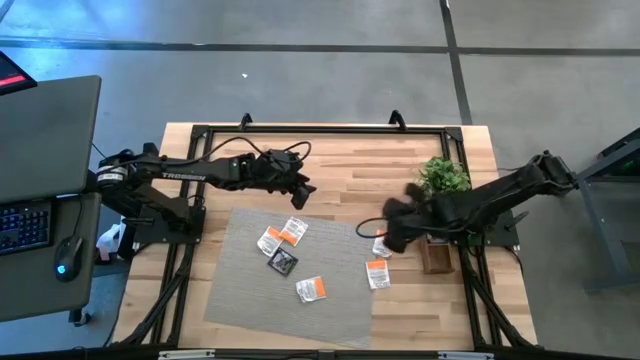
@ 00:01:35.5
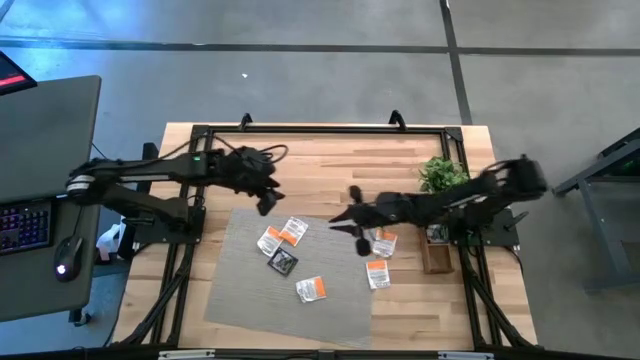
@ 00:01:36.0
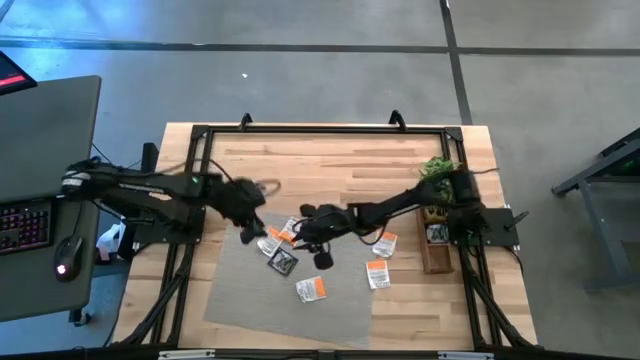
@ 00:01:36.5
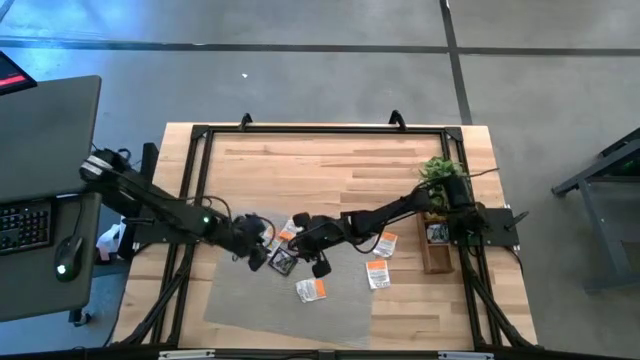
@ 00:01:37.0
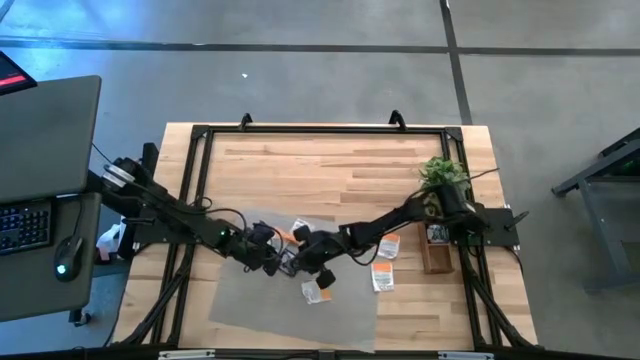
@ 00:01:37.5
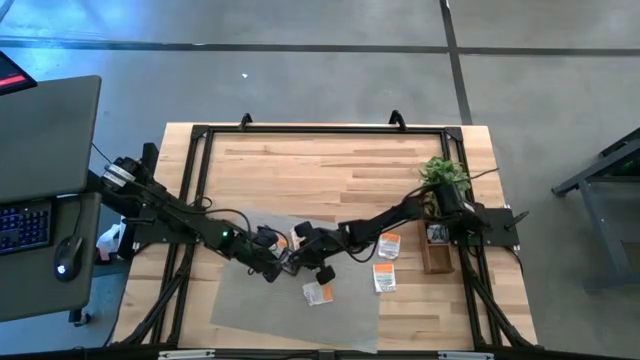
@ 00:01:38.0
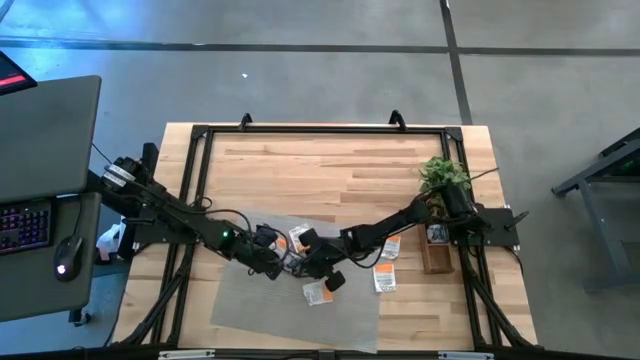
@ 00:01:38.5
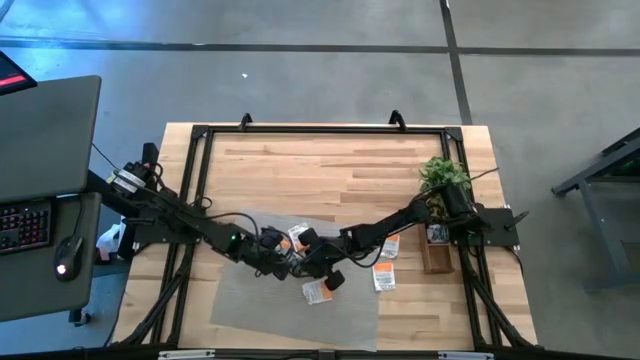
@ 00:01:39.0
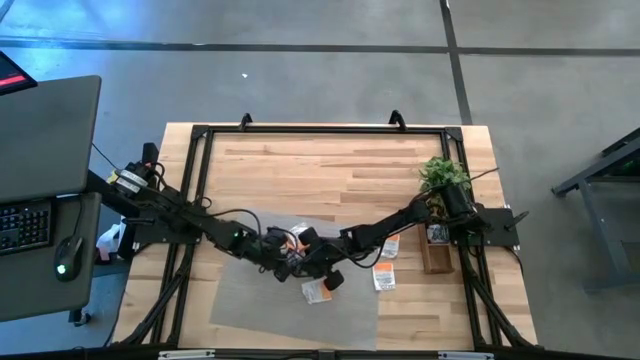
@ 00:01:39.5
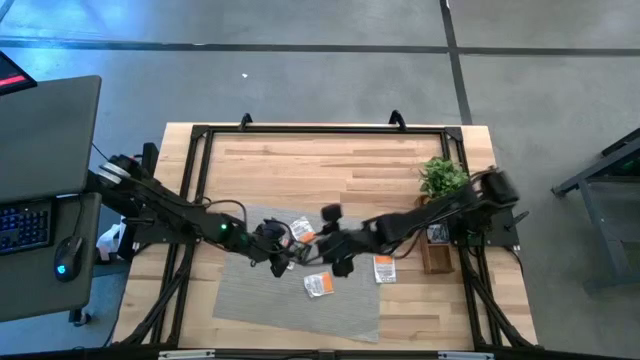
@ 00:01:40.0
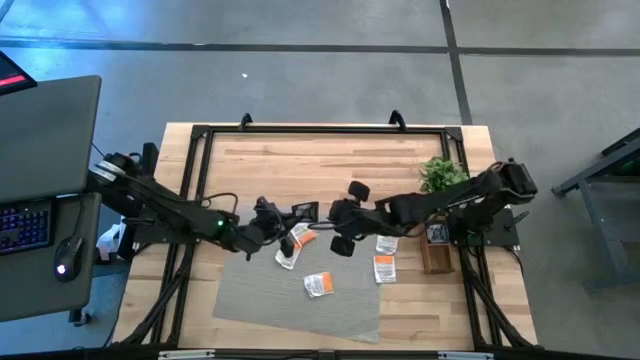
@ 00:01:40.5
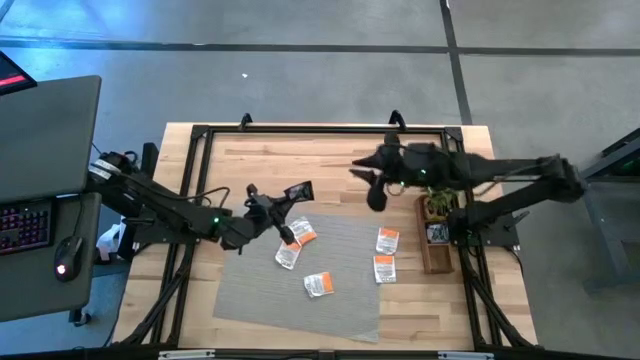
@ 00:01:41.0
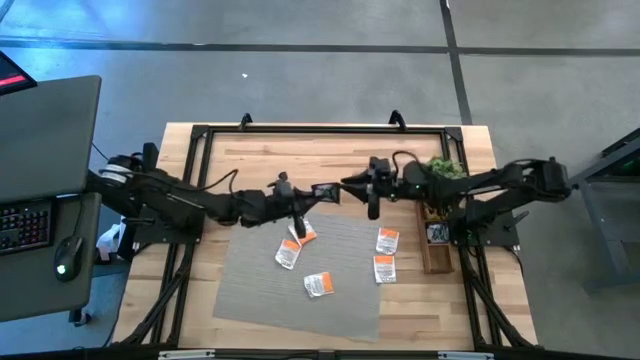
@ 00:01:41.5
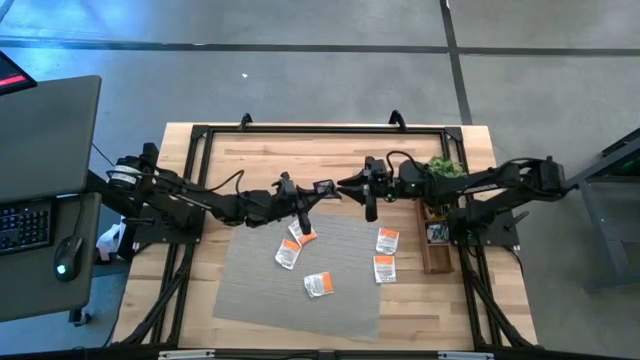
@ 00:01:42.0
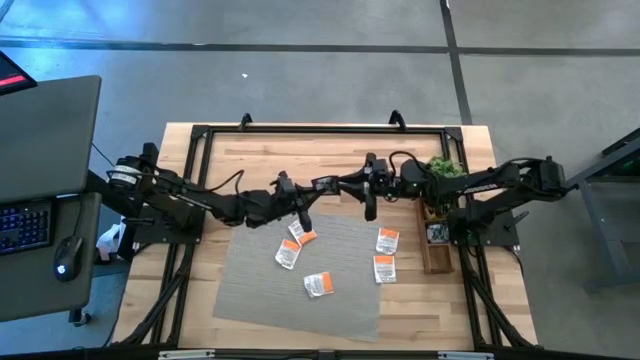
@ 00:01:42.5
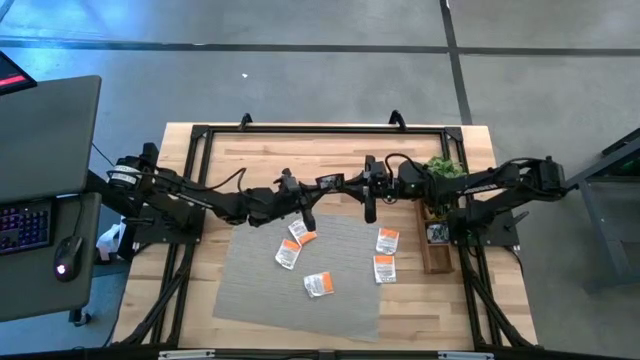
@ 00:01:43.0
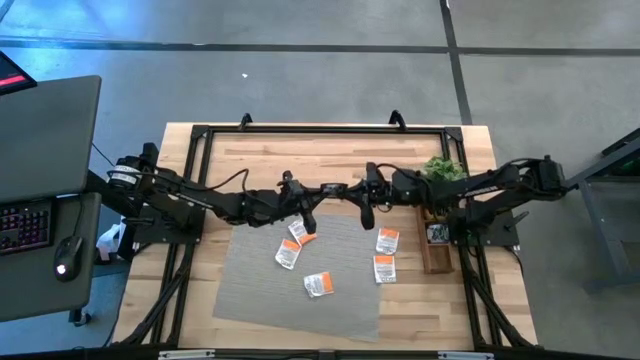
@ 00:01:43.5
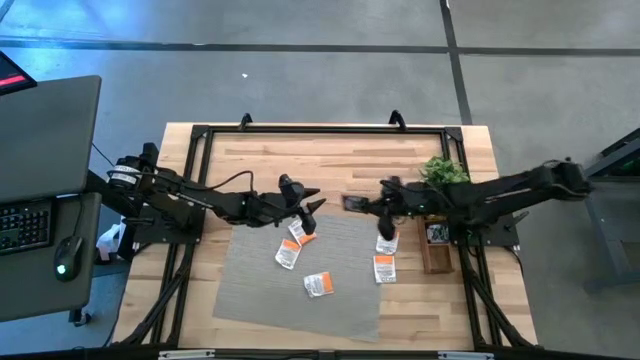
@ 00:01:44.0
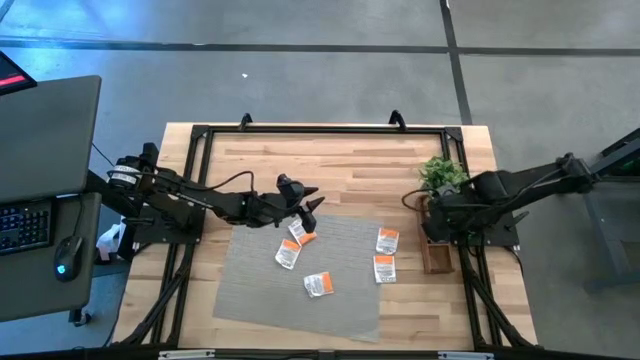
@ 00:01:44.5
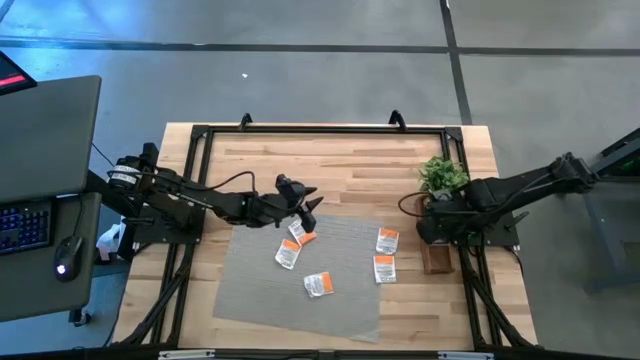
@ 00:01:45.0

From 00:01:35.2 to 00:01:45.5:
Task: Pick & Place Tea
Put the black tea bag into the middle section of the wooden organizer

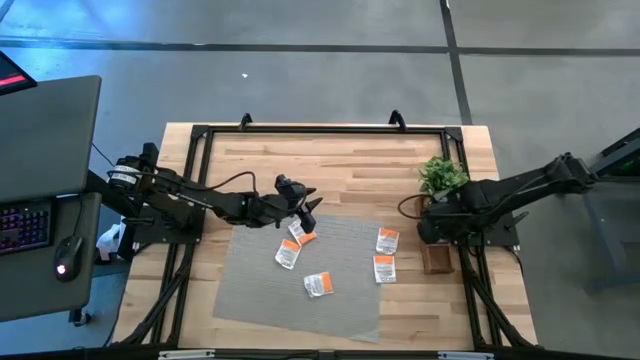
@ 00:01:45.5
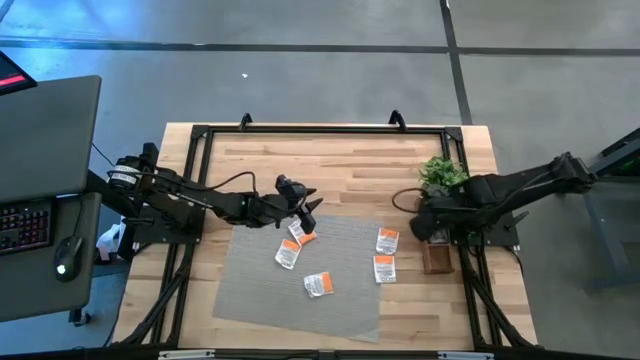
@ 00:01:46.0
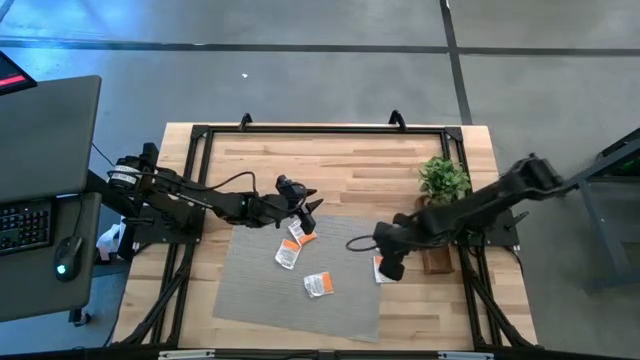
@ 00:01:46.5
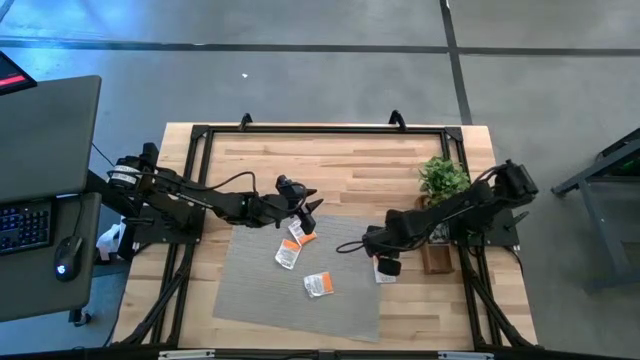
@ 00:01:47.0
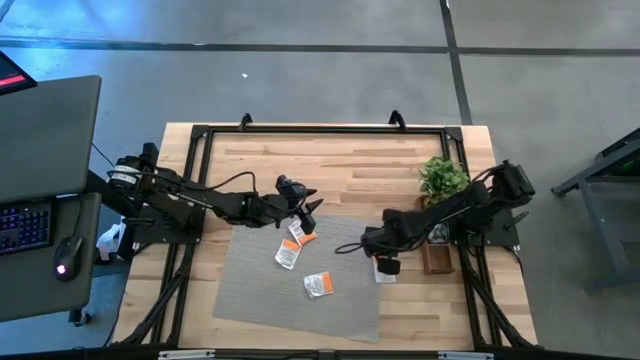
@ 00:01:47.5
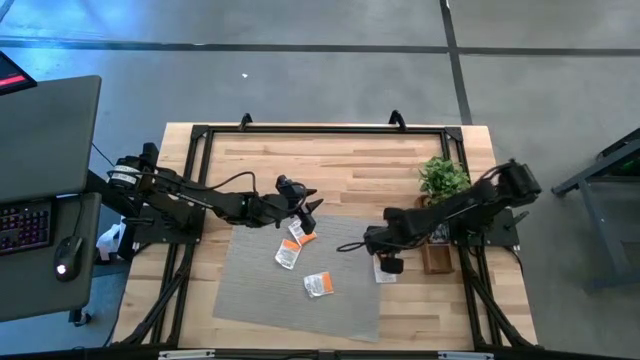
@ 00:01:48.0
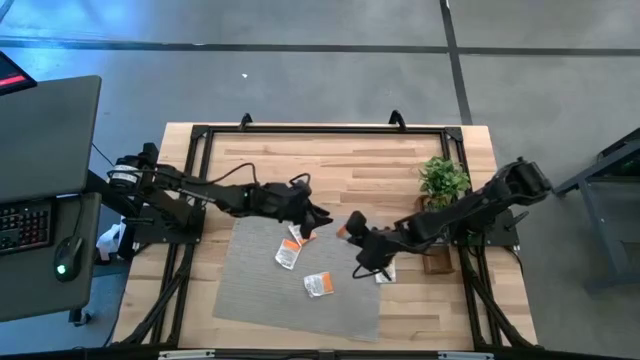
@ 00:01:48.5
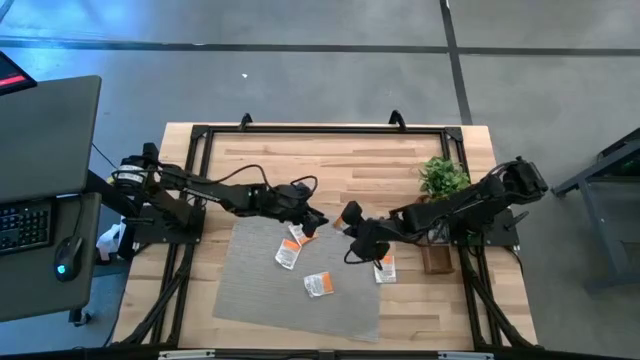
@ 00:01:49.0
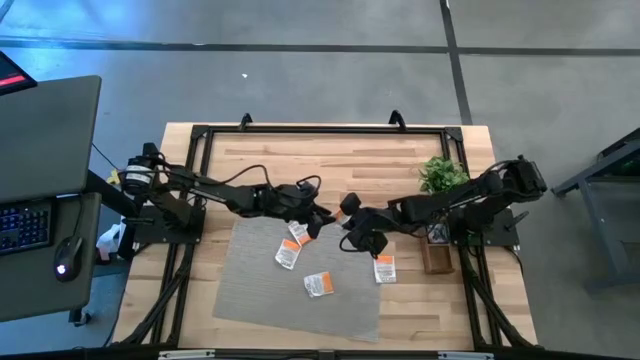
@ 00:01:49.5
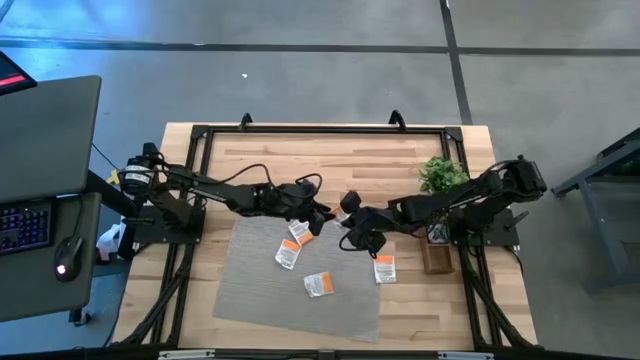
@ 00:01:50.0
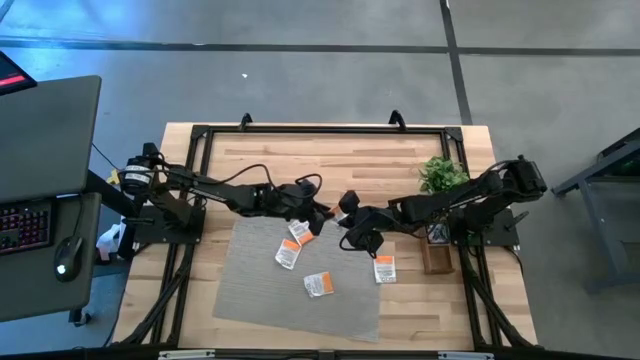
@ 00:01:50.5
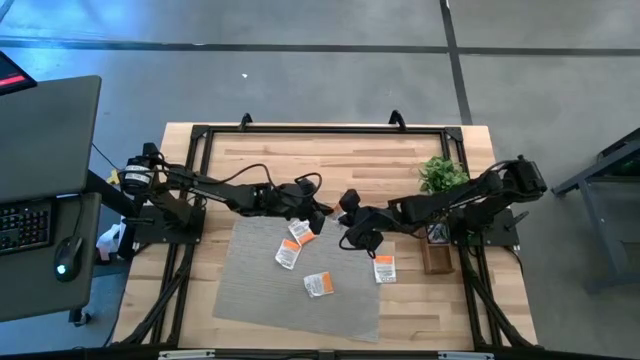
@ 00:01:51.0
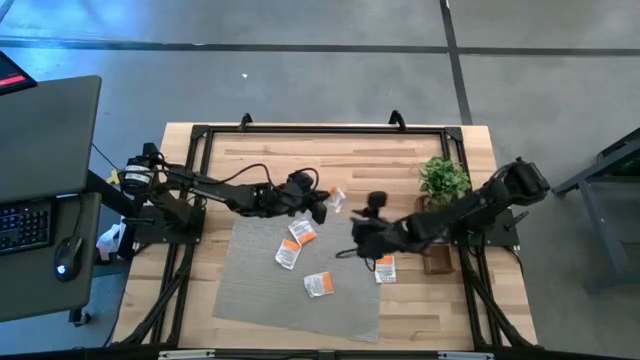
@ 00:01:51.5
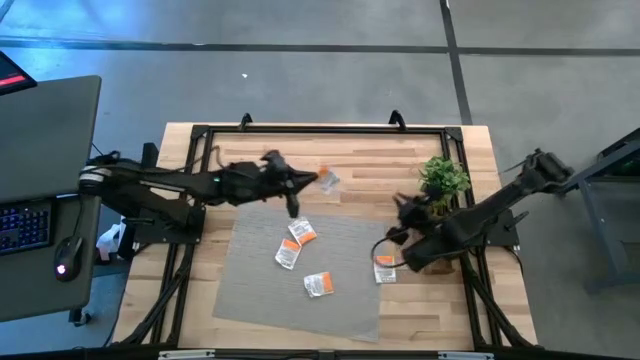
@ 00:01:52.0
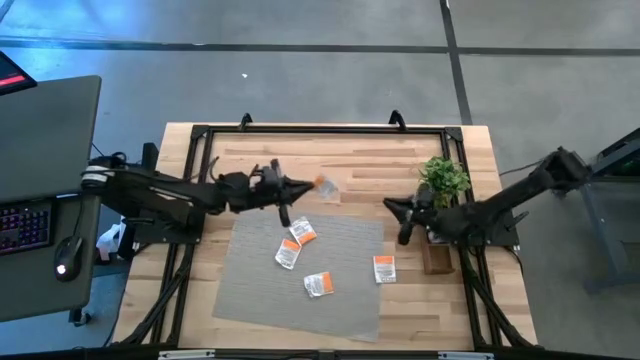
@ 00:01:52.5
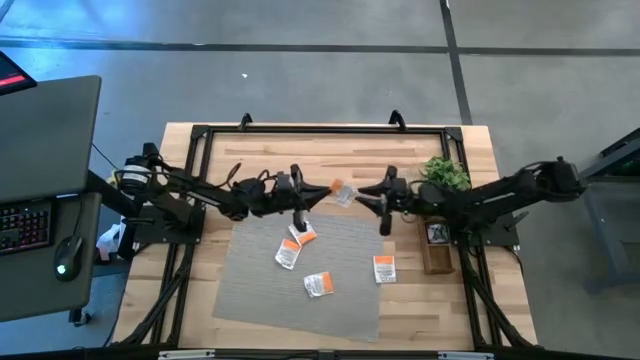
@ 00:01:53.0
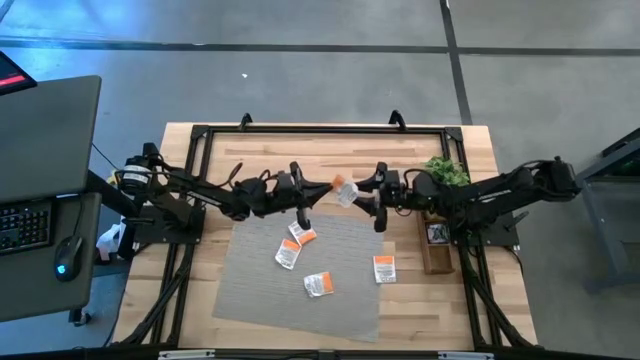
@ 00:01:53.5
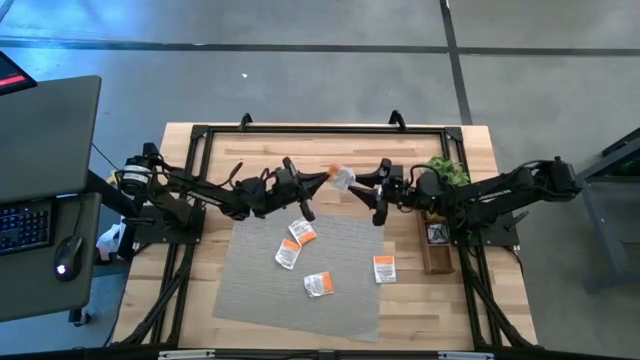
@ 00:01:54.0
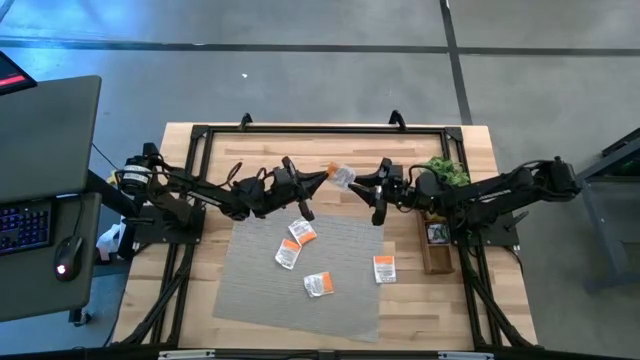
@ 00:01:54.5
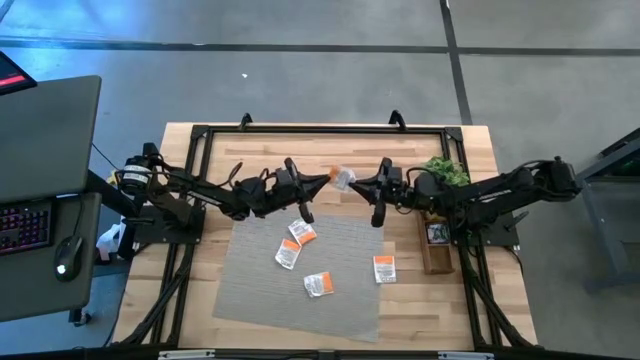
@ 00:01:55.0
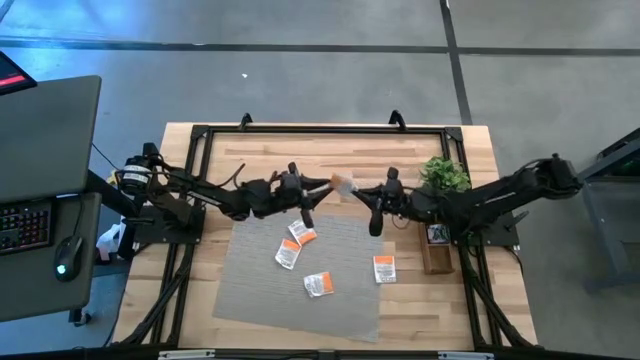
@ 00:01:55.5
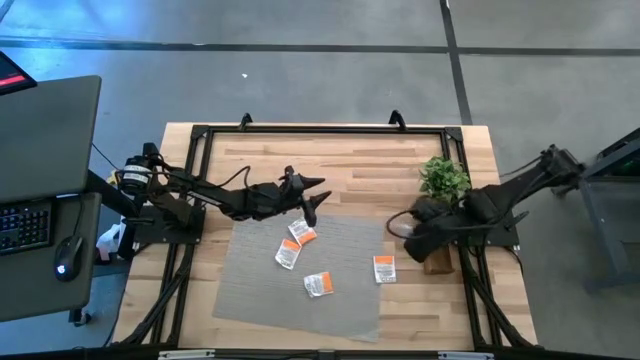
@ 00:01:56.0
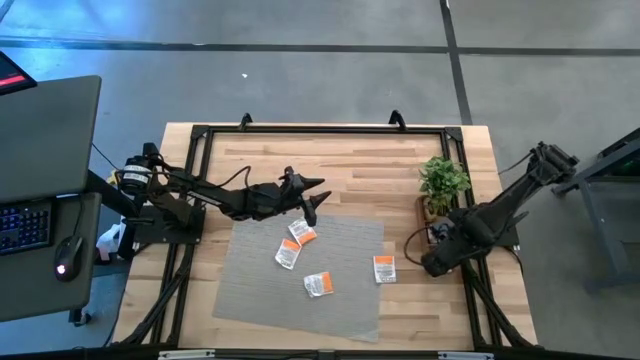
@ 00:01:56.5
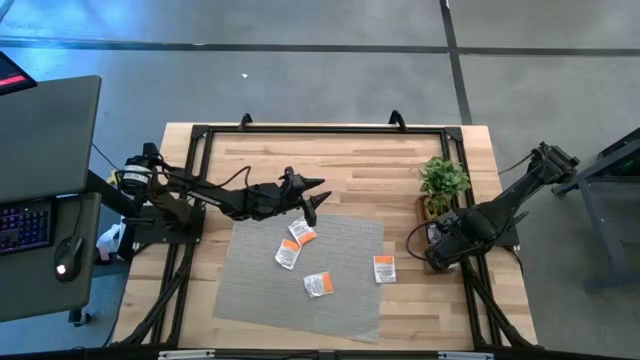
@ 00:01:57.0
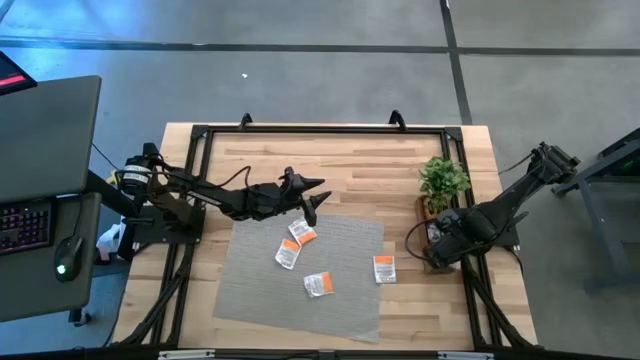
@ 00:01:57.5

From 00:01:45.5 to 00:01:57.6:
Put the white tea bag into the bottom section of the wooden organizer
